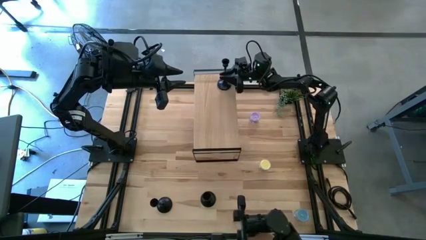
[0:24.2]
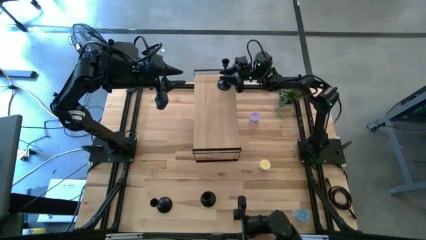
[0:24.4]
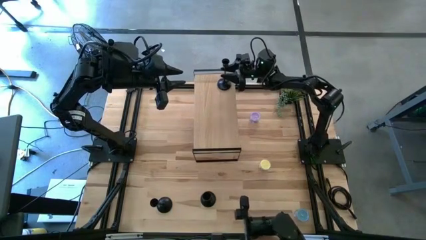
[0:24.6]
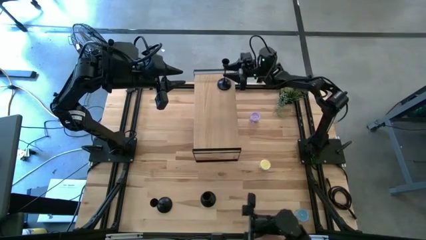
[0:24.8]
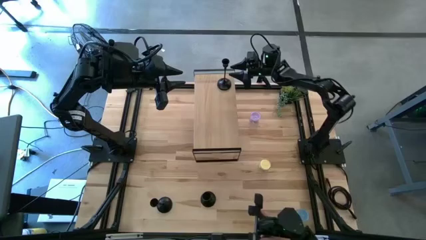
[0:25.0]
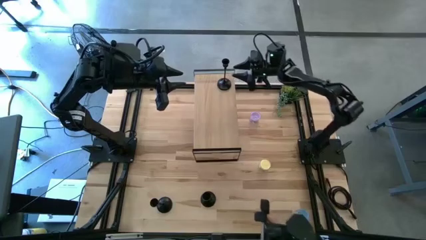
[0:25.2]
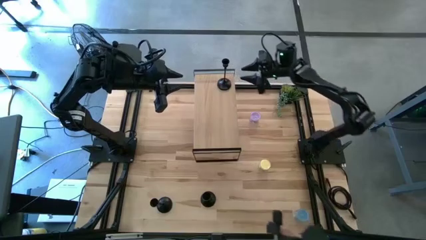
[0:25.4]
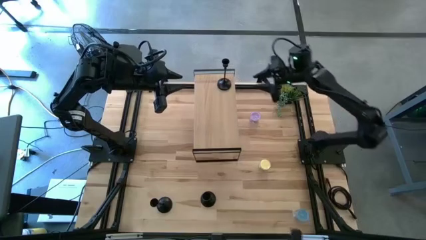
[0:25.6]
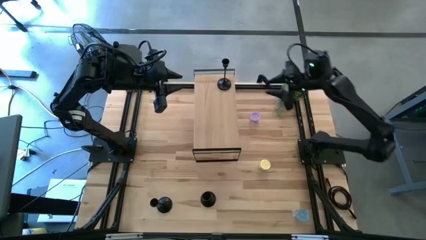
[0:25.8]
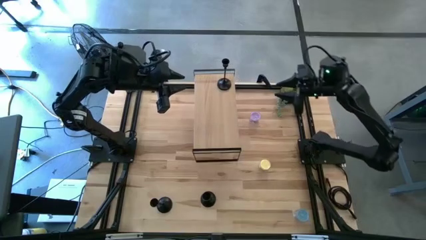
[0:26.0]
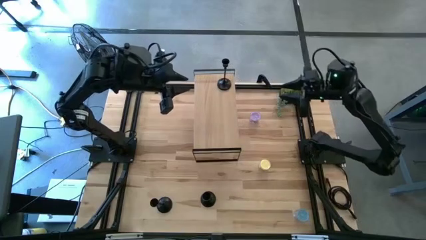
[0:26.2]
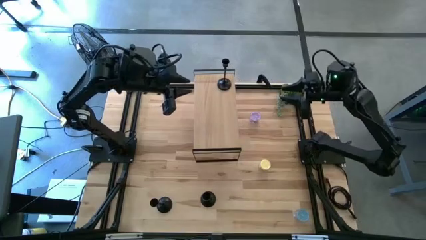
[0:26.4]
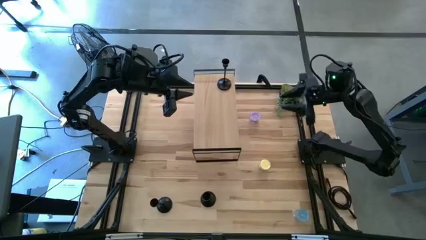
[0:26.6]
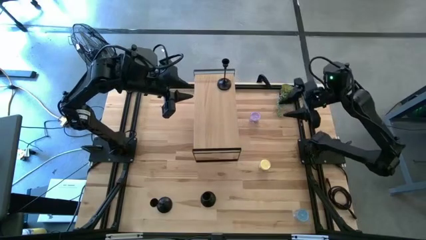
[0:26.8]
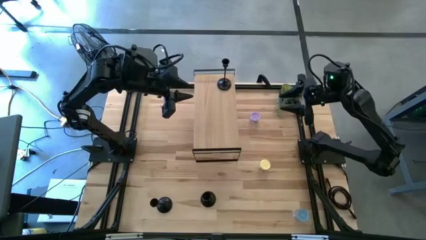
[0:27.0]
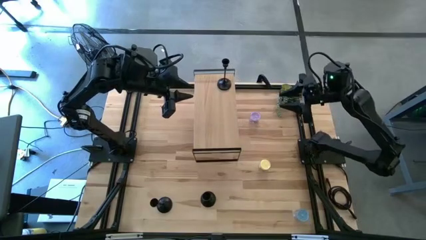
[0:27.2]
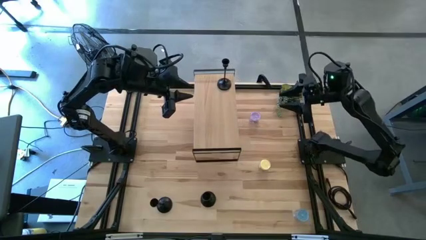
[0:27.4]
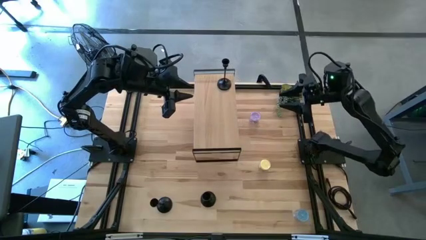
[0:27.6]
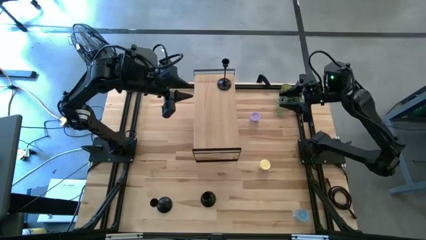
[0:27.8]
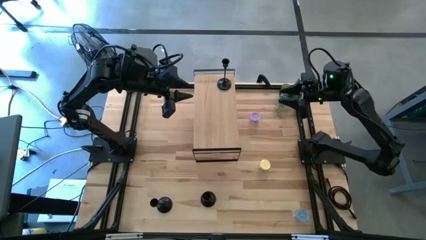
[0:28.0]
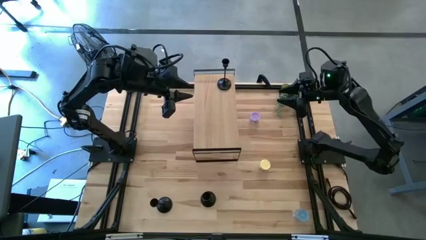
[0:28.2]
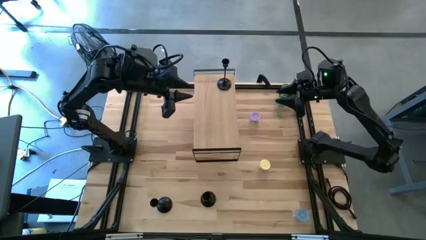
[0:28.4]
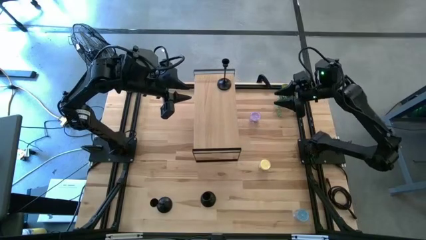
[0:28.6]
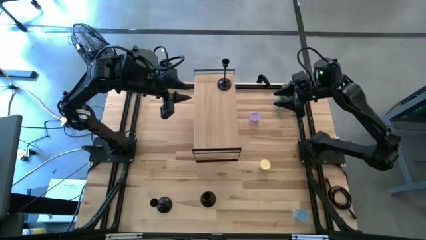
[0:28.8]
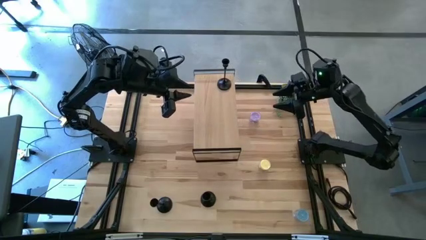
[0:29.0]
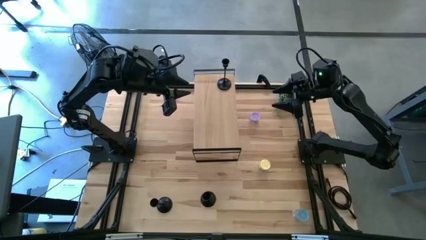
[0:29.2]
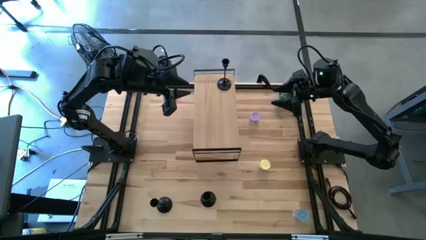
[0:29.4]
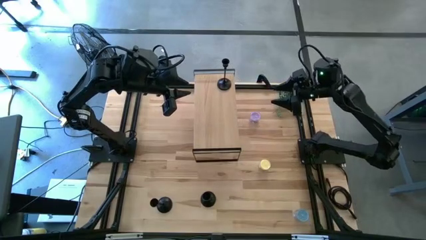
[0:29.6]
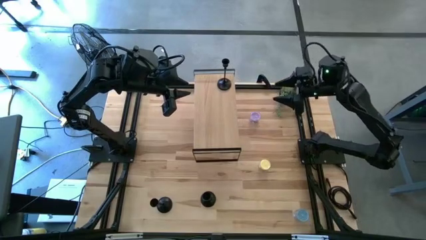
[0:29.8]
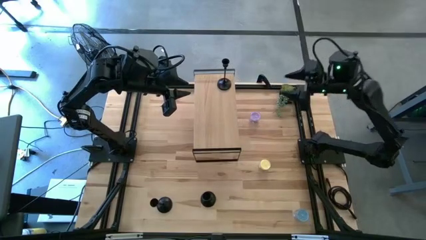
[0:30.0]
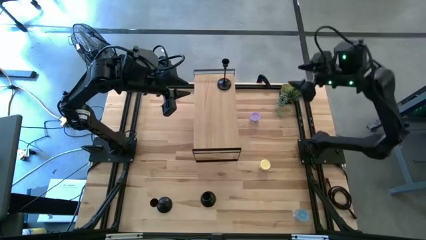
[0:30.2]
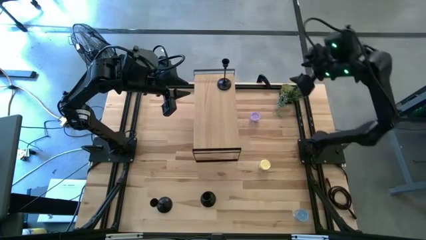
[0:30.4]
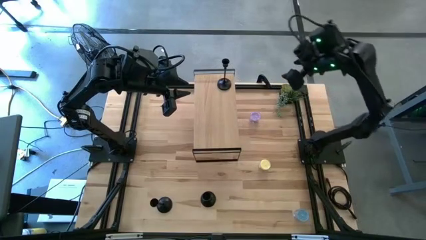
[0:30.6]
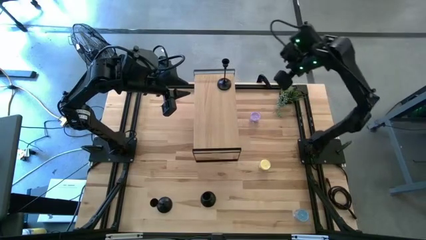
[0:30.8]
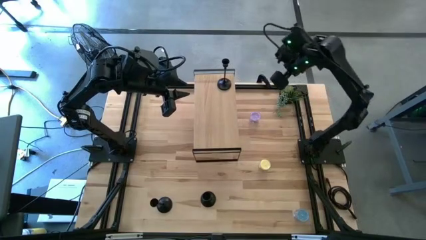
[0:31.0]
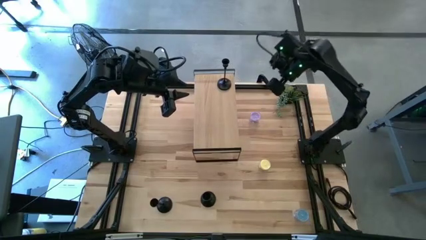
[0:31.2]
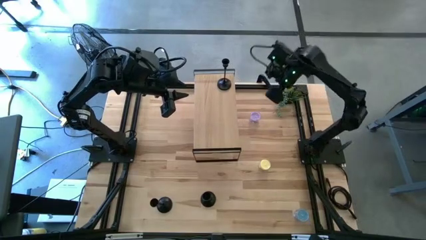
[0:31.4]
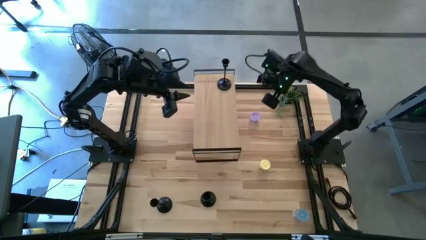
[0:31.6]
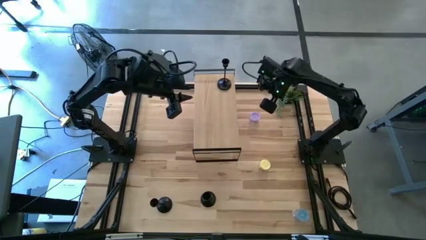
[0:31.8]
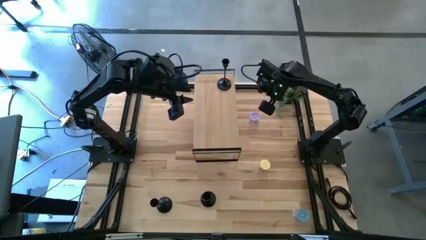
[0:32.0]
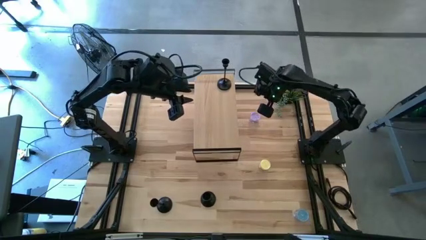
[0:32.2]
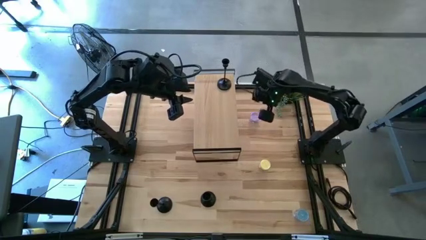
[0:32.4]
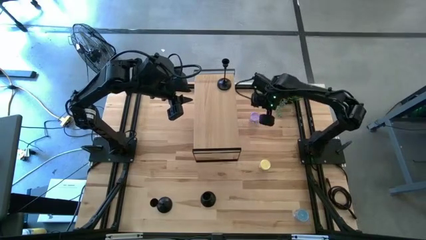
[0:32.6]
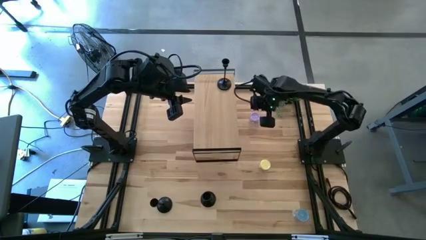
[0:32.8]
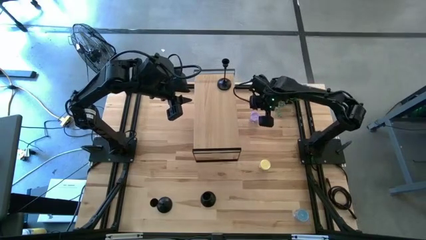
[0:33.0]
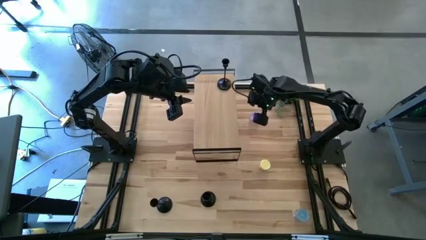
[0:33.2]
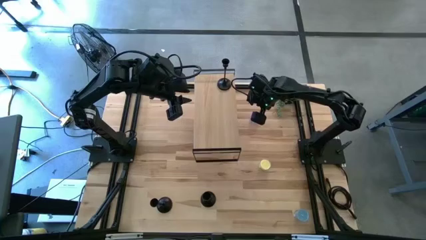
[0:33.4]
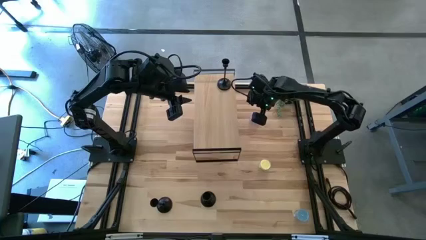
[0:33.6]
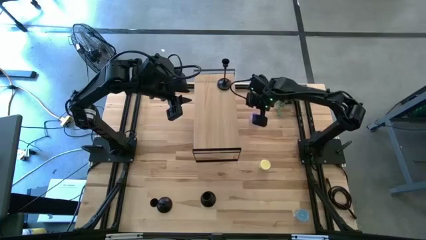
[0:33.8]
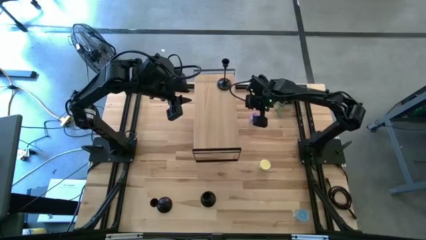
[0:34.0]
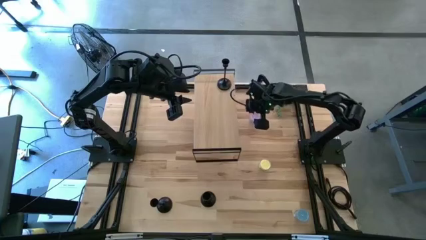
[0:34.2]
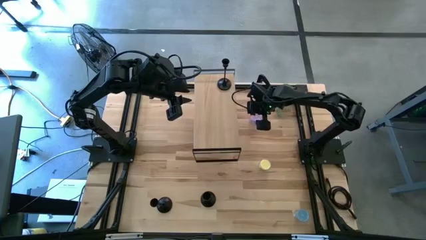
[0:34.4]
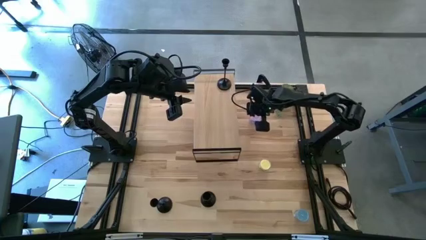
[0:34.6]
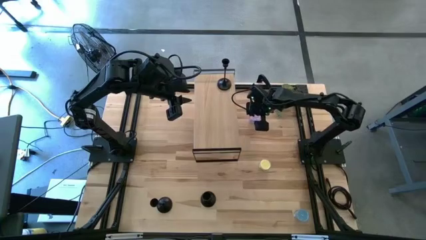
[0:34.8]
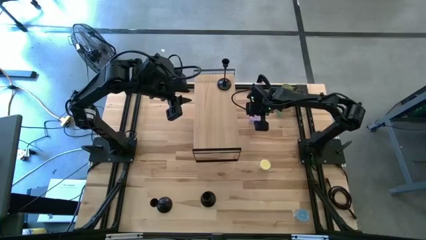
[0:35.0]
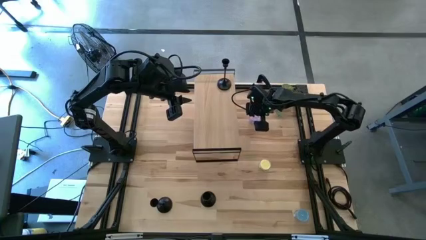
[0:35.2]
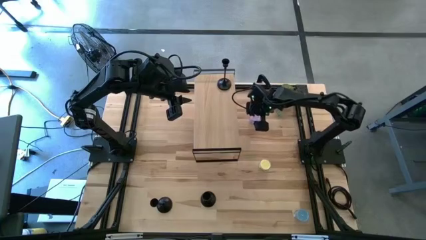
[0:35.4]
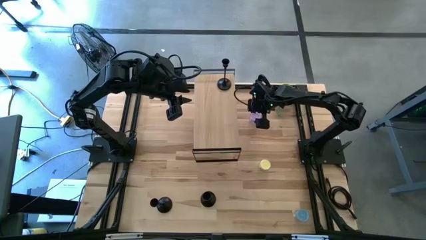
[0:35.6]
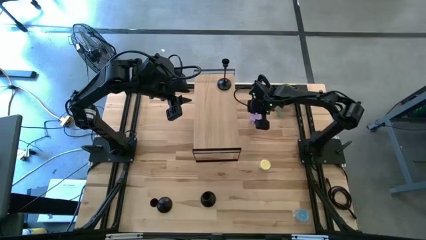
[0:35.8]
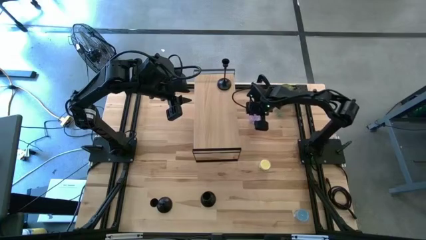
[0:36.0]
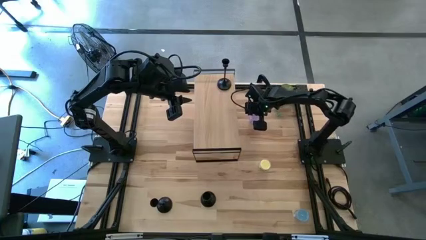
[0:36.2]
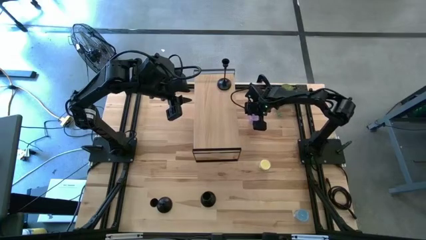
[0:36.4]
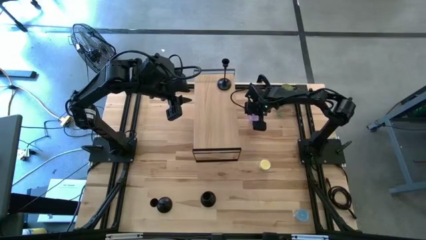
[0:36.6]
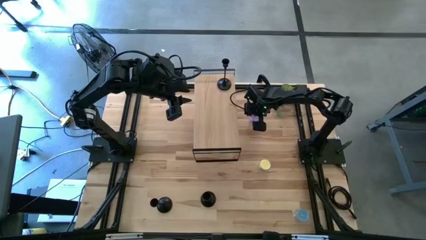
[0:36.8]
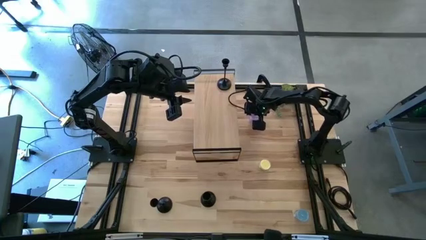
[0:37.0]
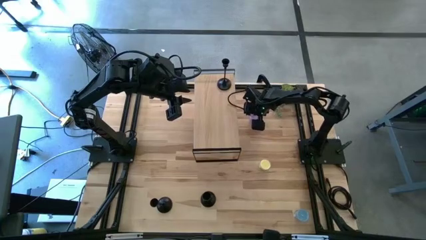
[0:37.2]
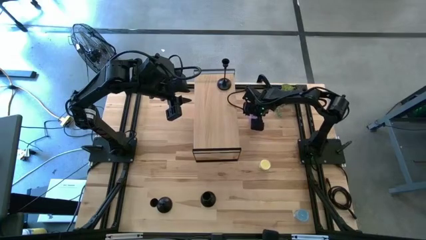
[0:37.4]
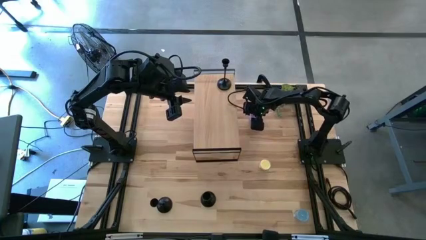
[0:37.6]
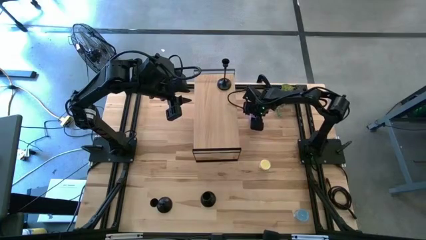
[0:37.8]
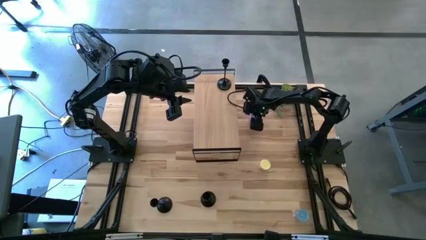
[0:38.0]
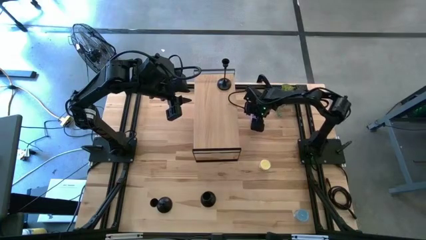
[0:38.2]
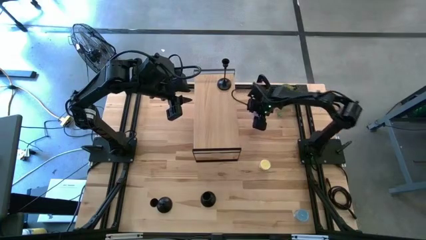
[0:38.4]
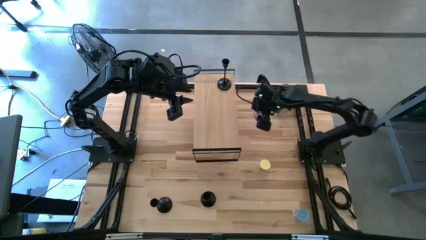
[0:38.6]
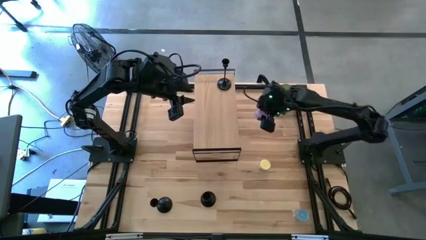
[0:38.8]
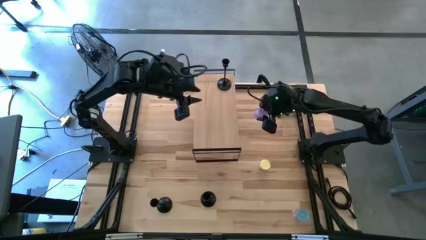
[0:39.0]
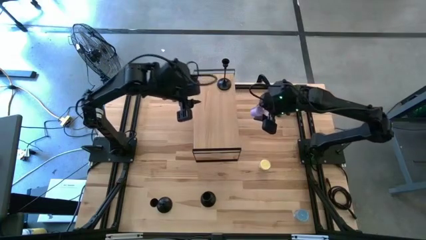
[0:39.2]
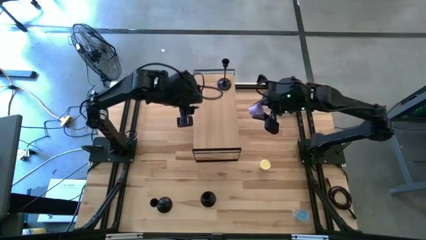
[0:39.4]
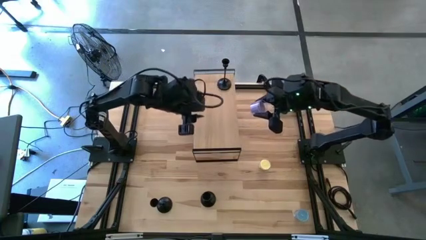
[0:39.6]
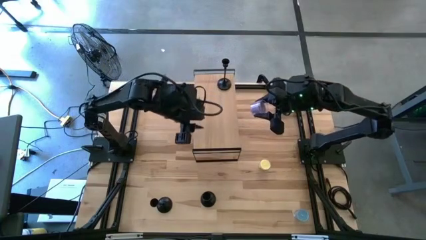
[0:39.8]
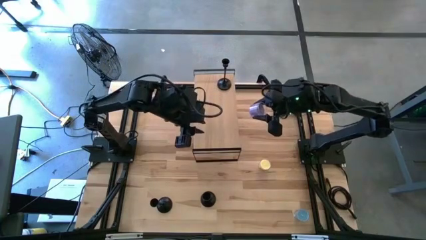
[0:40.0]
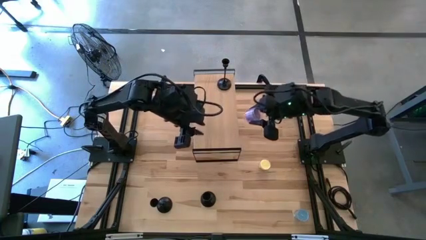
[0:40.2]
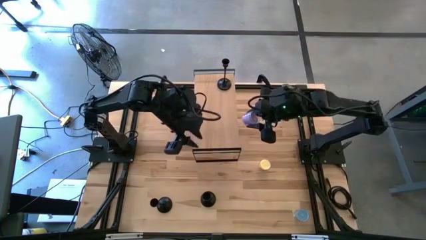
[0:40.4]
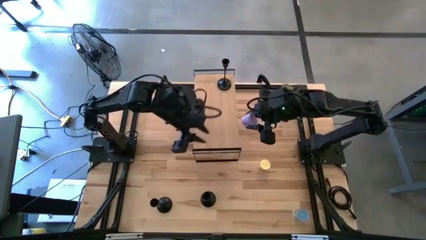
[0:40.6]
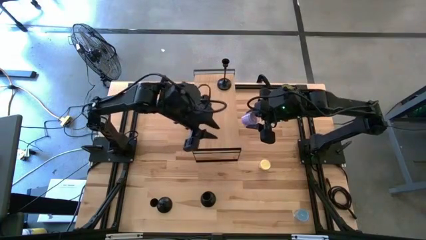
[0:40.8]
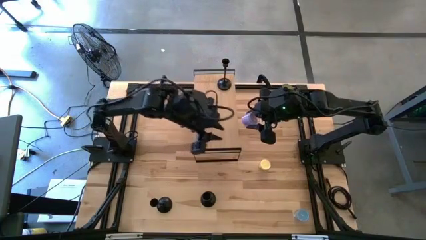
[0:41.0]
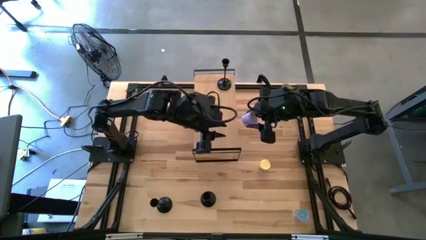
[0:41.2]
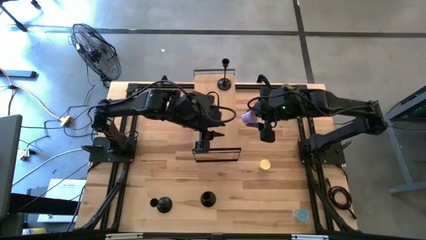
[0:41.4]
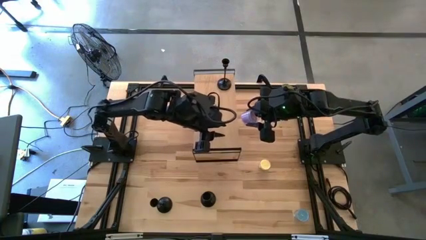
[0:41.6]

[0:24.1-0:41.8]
Task: Pick & Place candle stick holders
Put the purple scented candle on the shelf
